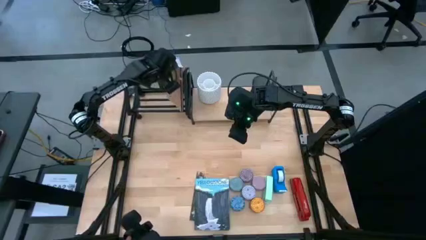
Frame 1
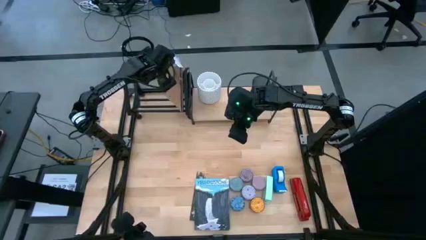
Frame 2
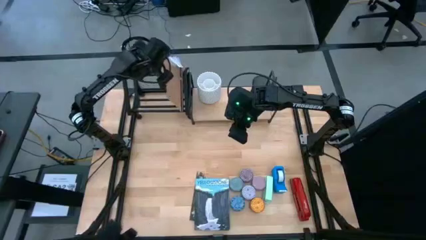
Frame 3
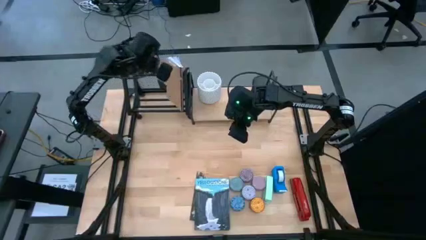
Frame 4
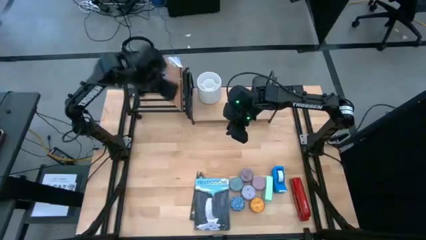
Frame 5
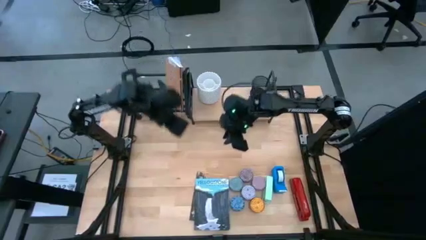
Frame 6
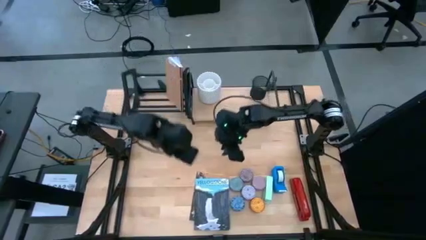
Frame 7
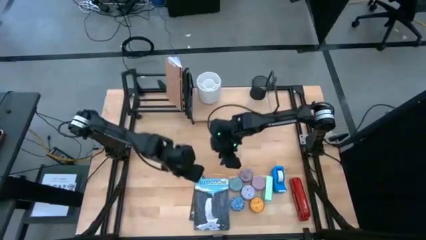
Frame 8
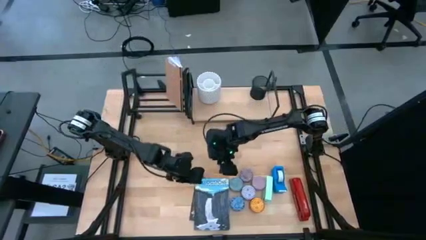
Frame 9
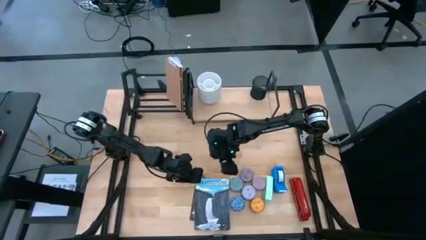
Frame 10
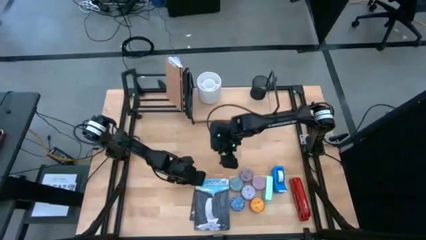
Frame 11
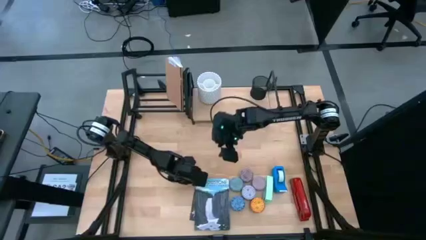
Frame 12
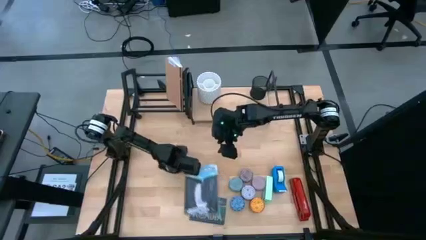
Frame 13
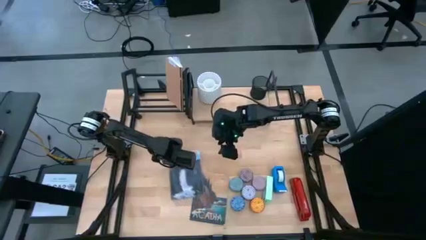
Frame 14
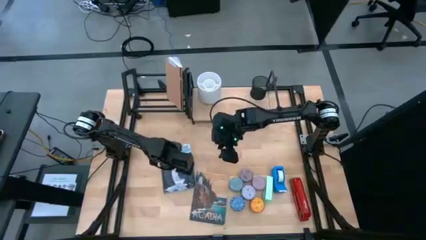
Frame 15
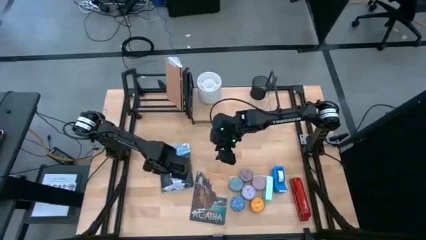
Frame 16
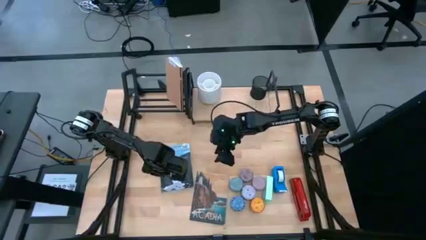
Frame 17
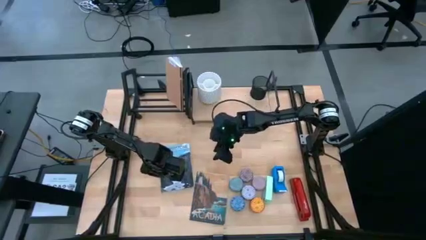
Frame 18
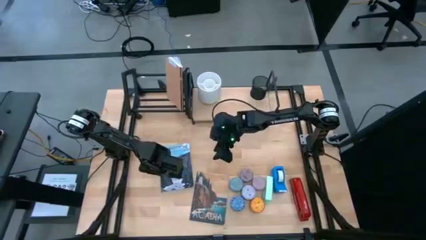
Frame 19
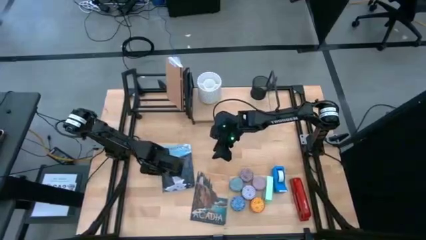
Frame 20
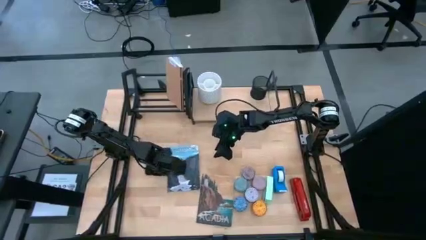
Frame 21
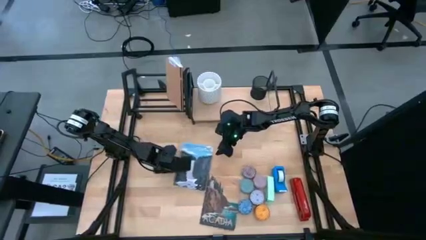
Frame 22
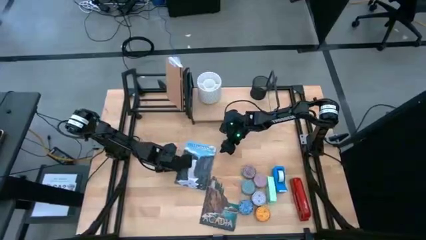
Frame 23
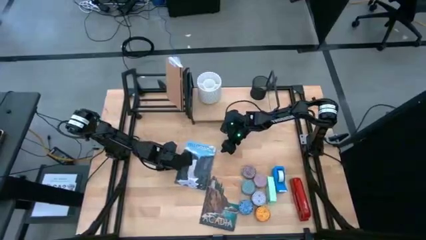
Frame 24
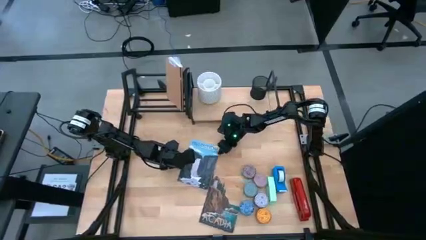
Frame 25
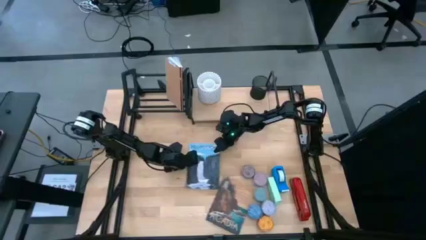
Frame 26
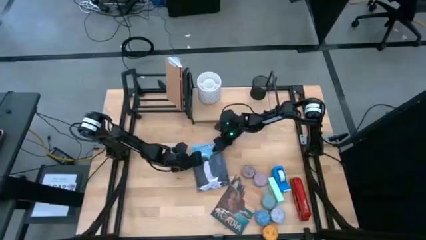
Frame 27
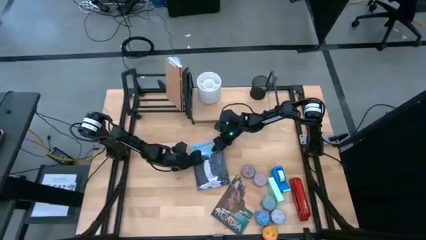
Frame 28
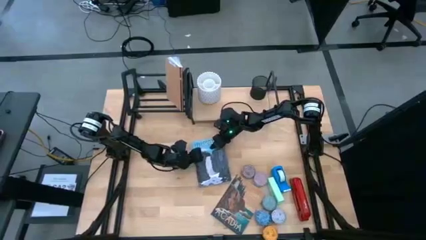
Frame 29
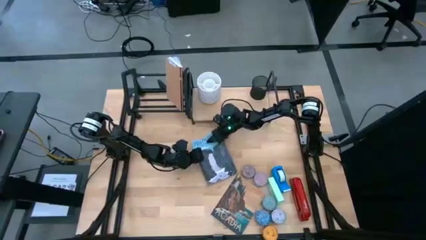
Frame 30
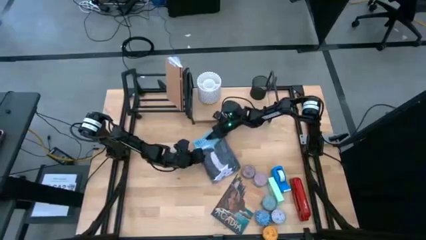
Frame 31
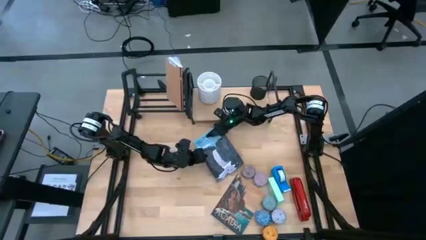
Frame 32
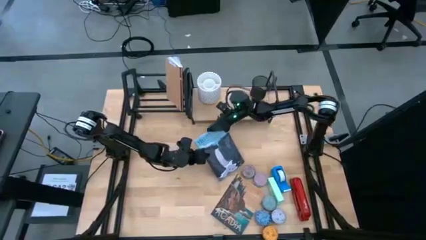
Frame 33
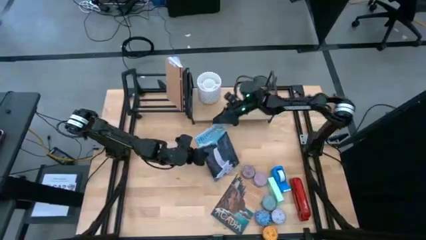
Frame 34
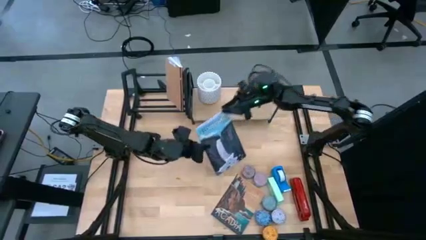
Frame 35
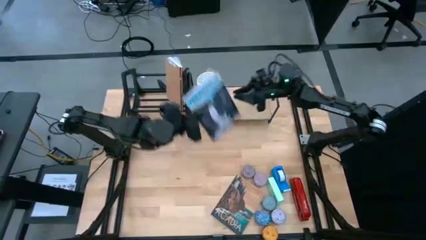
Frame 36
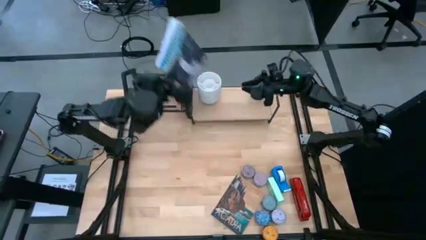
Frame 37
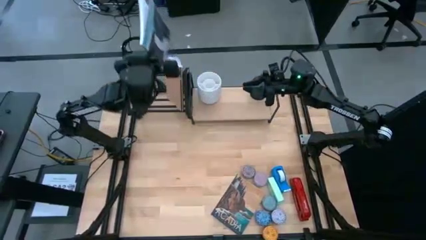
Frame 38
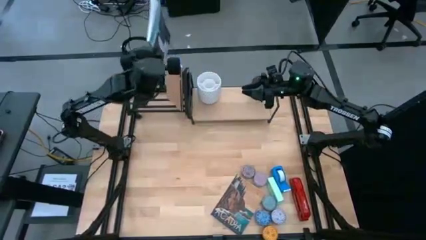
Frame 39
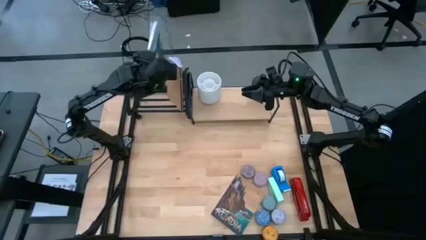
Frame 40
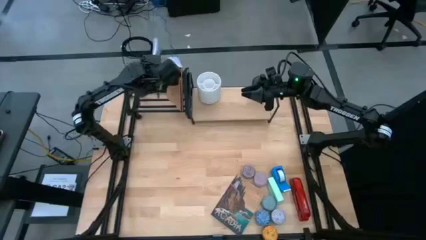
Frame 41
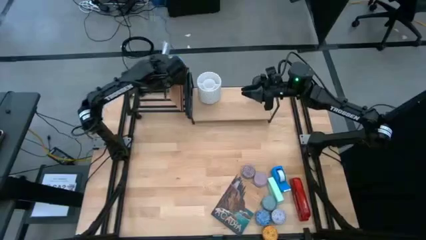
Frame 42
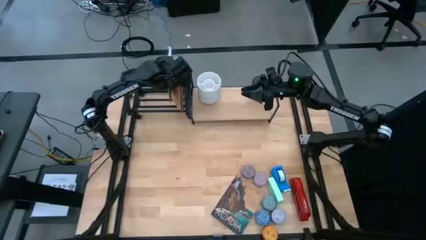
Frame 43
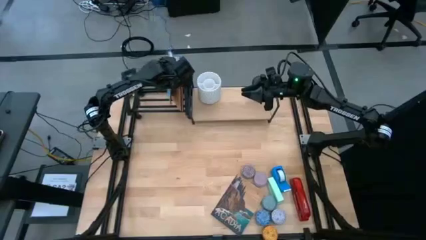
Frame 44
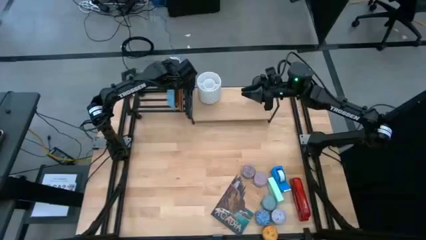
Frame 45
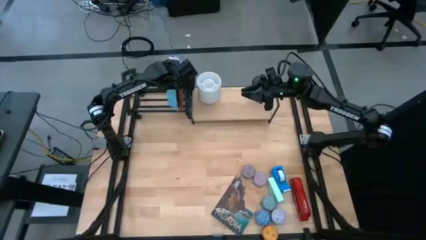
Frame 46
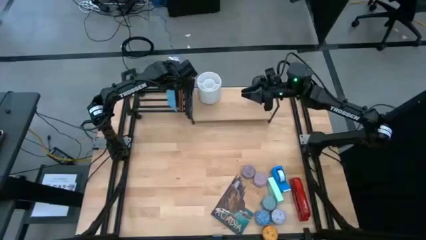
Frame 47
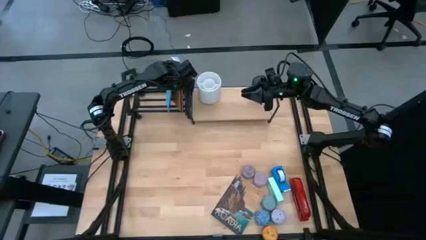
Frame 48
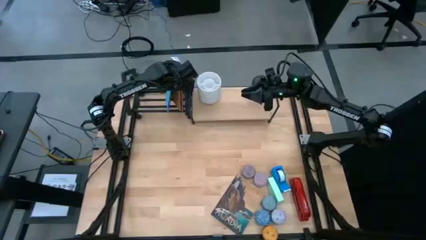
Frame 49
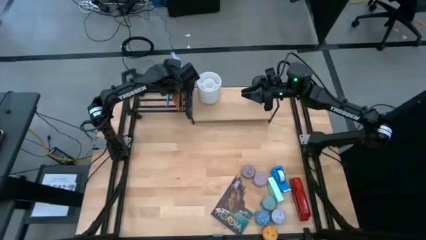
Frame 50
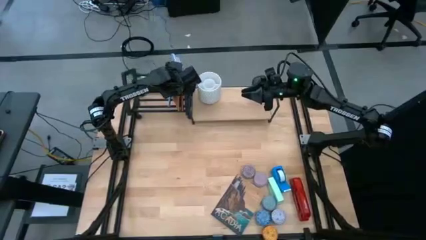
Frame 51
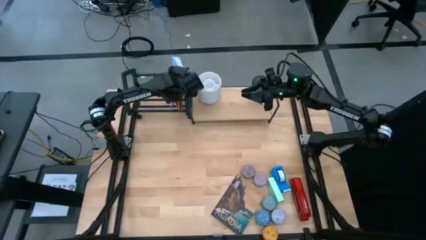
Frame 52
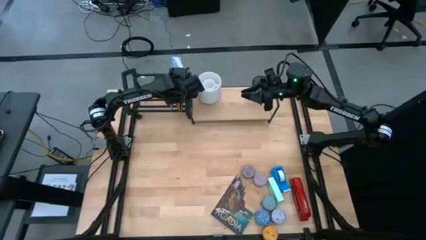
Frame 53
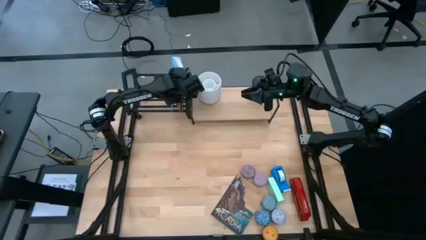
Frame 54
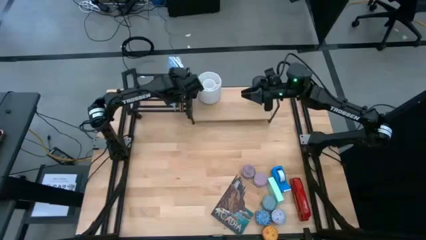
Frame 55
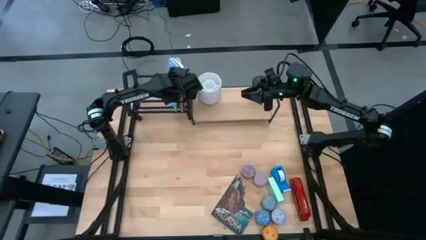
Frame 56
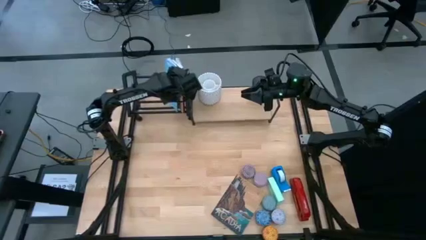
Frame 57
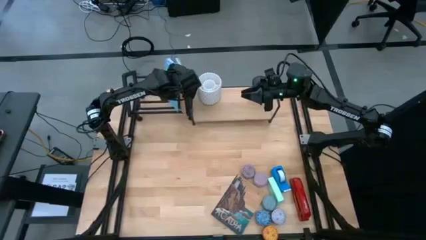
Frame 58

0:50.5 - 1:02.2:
Task: Stock shelves
Put the blue book on the bookshelf
